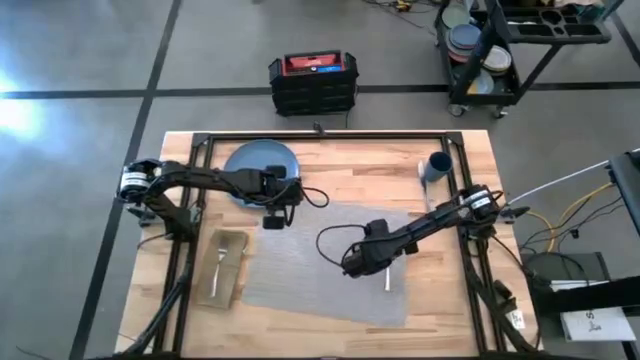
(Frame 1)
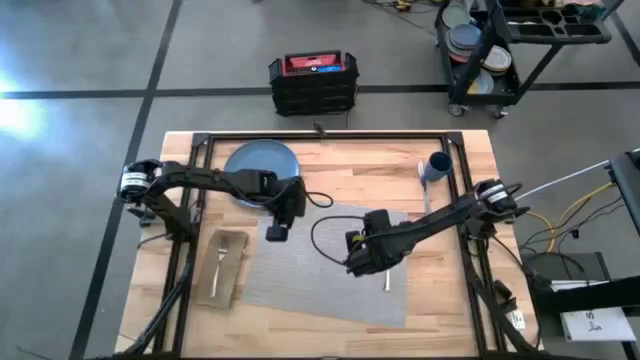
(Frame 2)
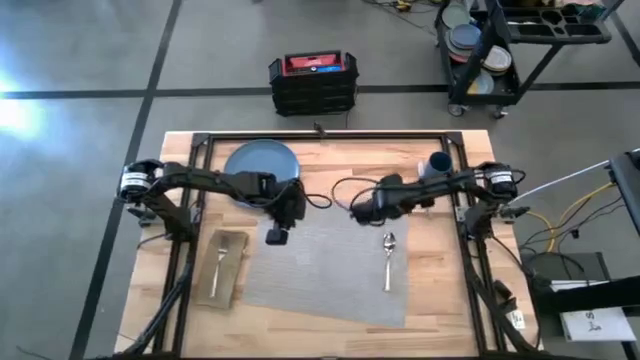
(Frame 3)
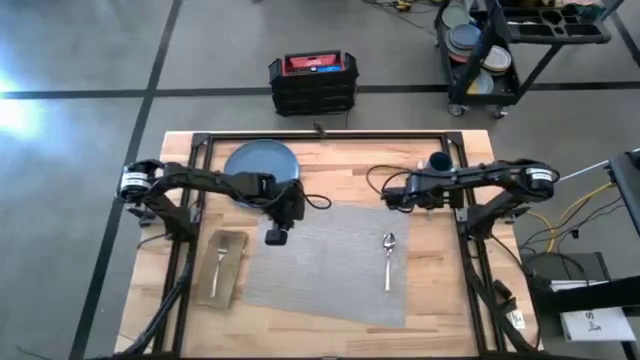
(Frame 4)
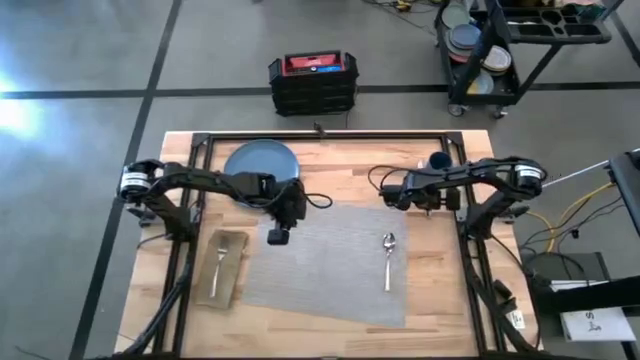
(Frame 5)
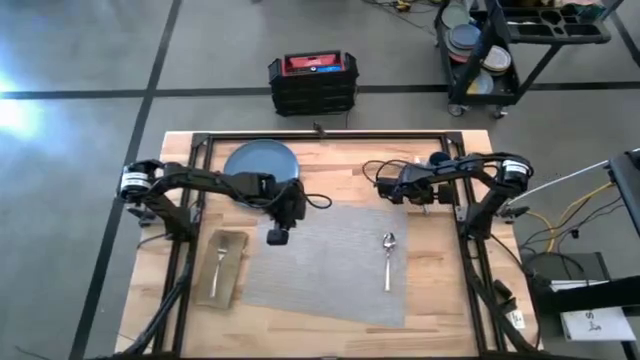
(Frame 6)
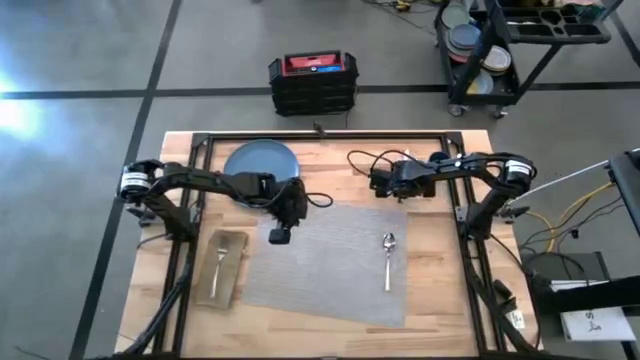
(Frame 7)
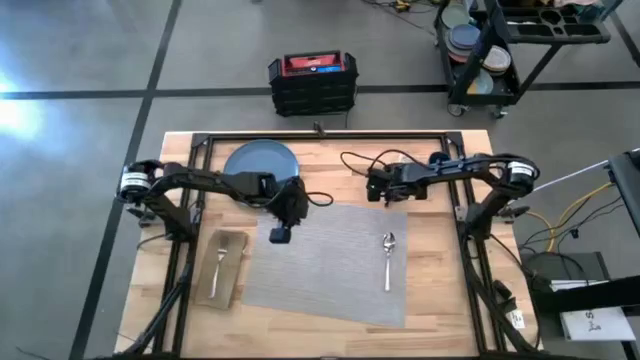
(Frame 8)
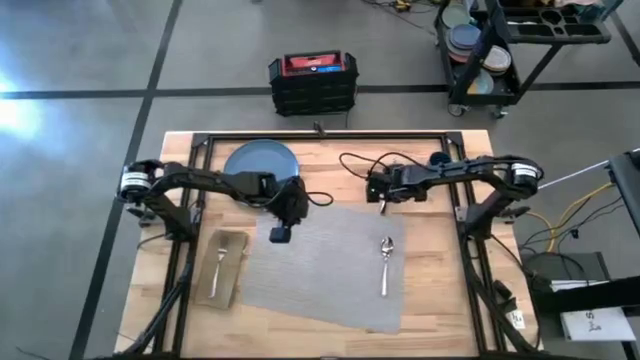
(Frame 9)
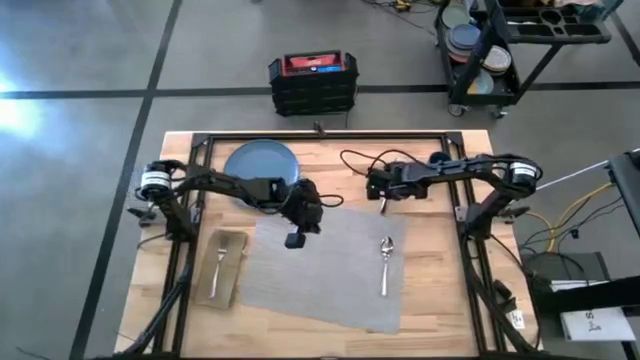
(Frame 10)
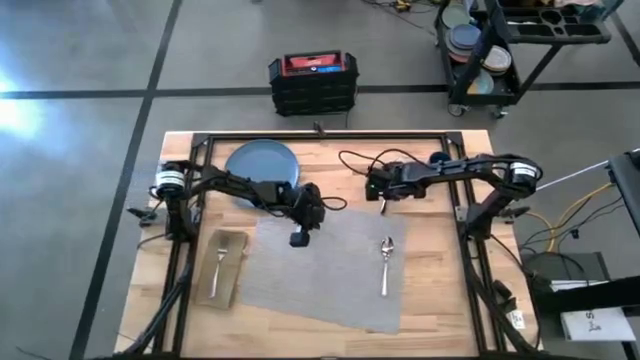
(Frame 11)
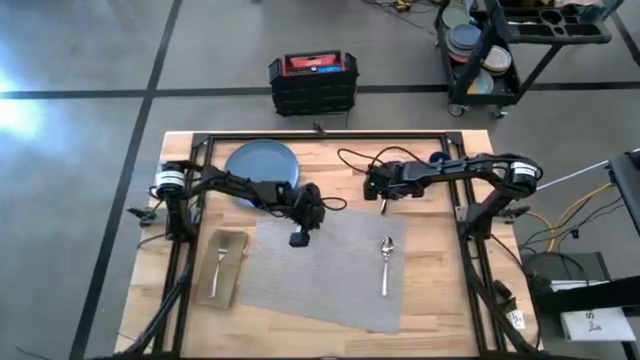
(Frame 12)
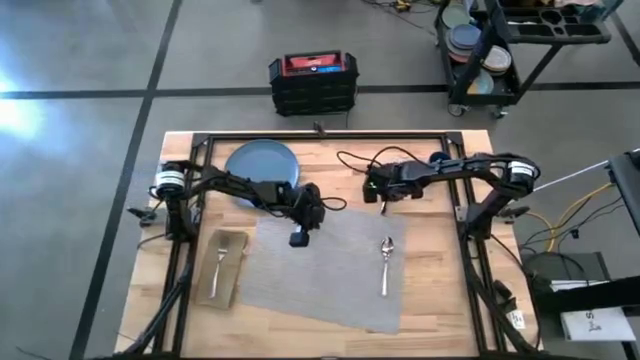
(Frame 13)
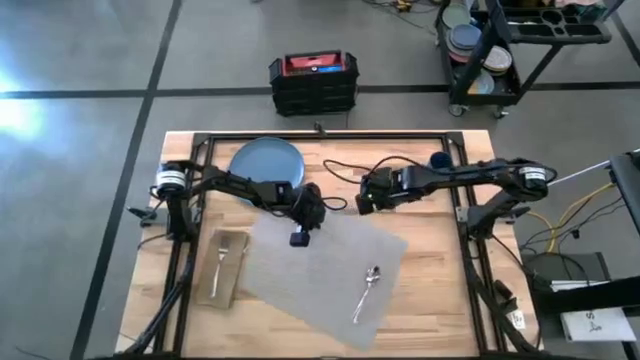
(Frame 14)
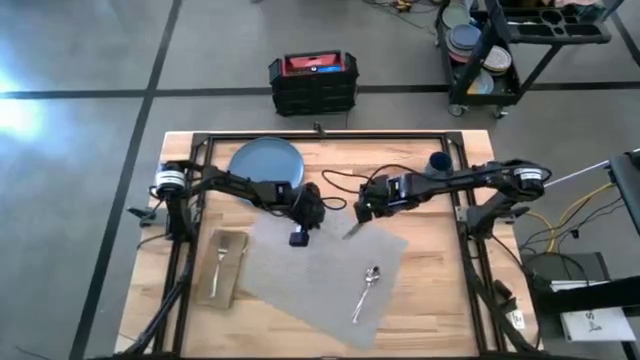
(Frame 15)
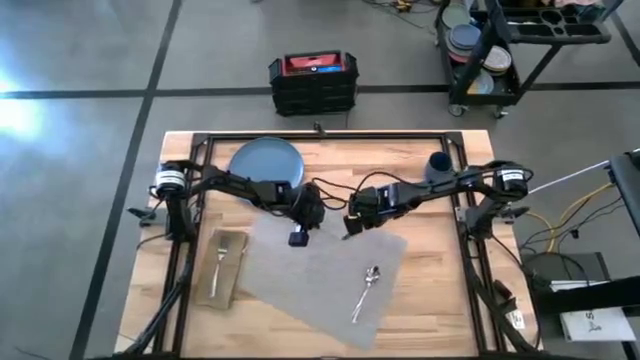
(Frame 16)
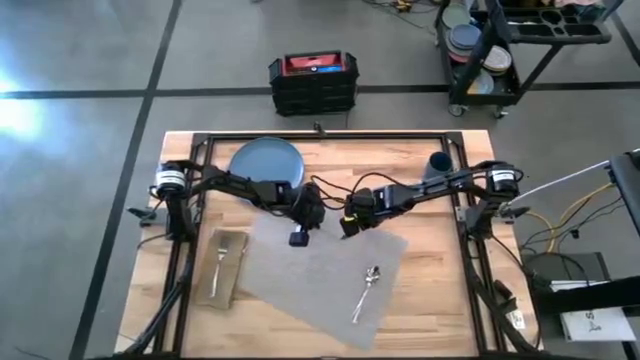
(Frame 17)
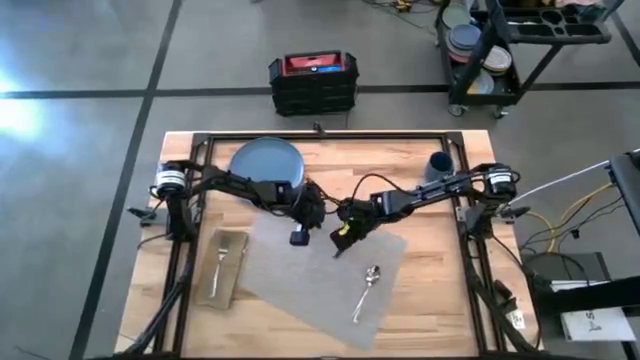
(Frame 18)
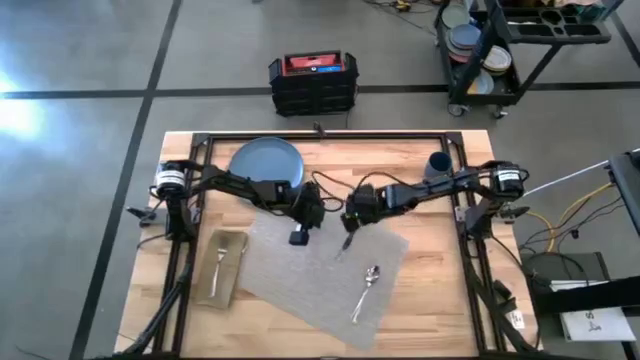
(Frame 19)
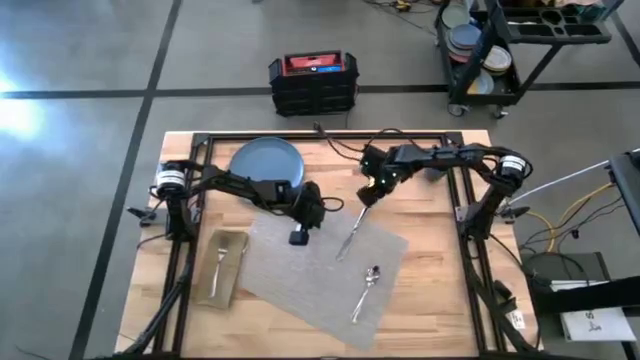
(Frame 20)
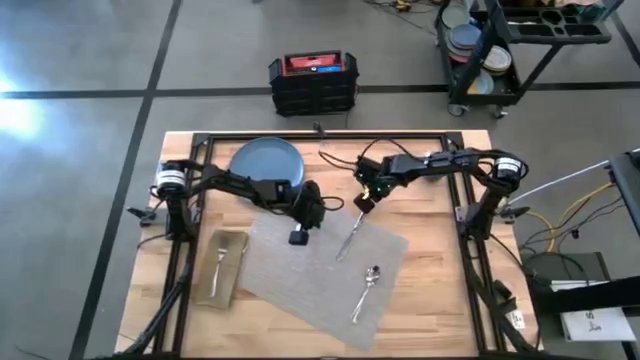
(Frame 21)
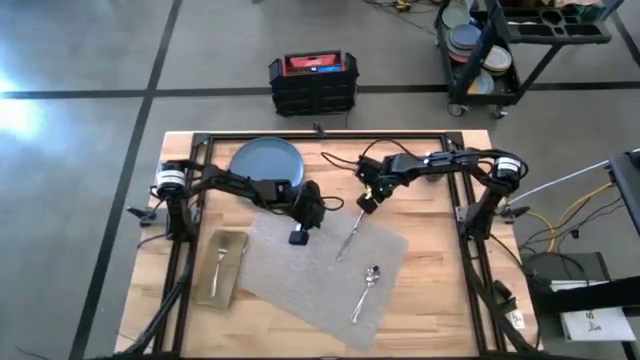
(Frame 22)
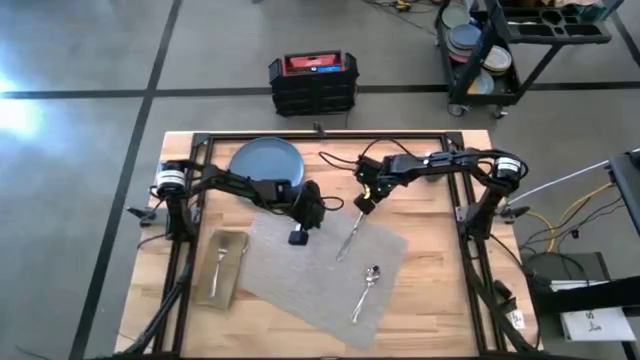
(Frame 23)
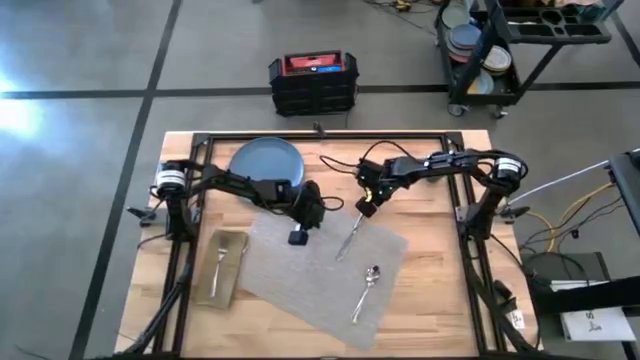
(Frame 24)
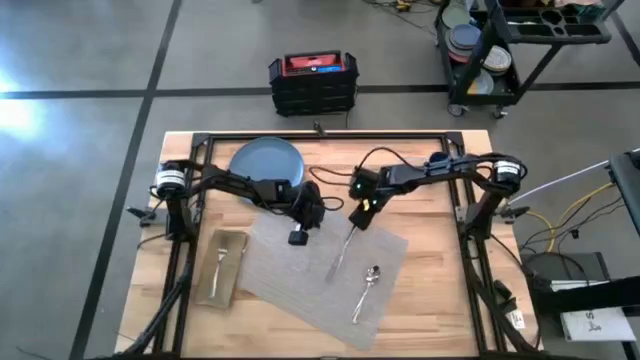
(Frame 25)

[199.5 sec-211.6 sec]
Task: Set table place
Put the silver table knife to the left of the silver spoon on the gray table mat

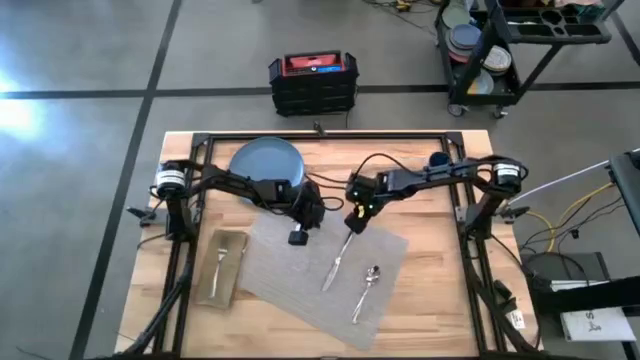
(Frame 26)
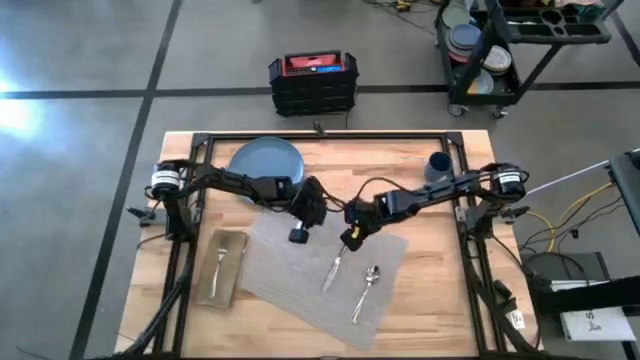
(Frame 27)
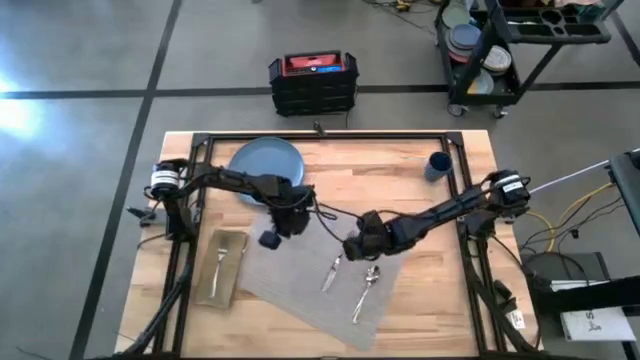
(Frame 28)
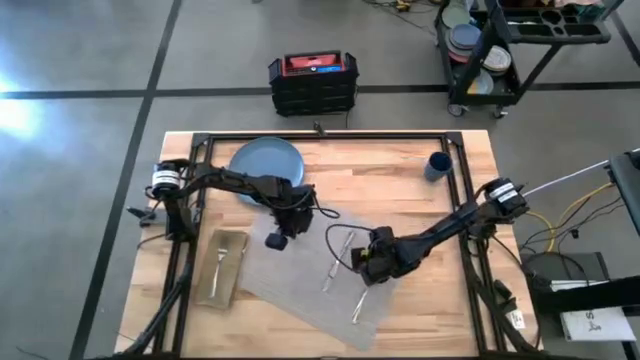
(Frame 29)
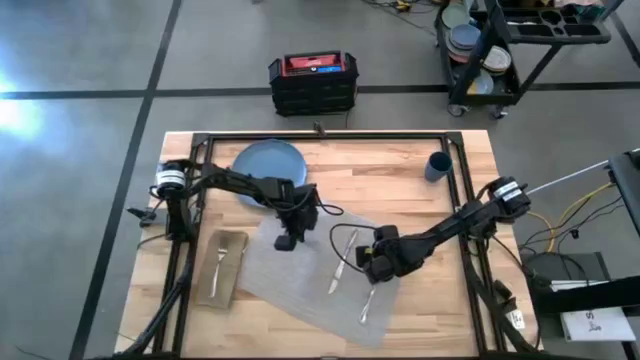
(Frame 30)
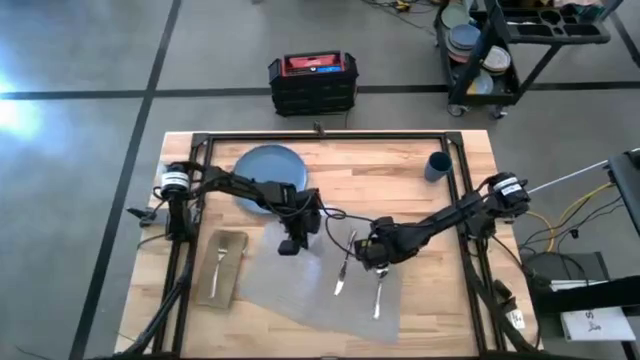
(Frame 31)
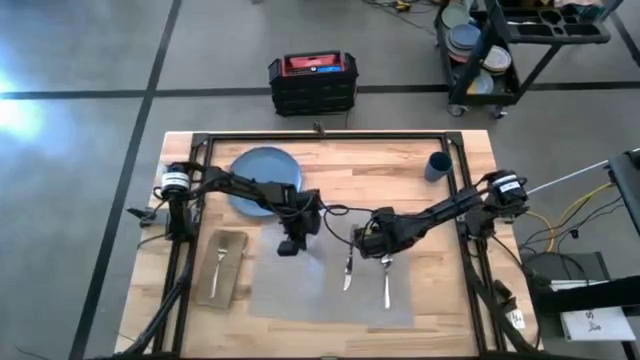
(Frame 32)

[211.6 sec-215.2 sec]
Adjust the gray table mat

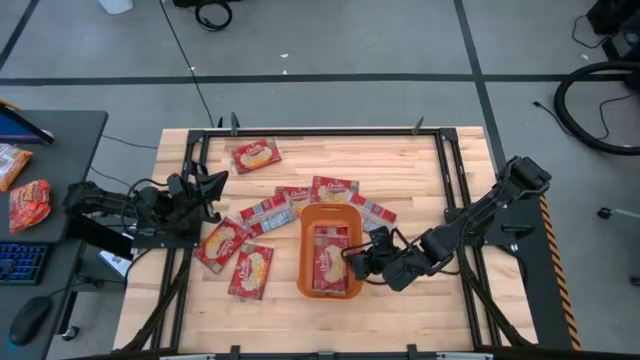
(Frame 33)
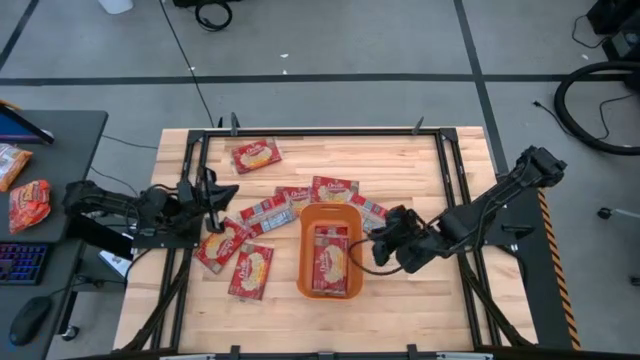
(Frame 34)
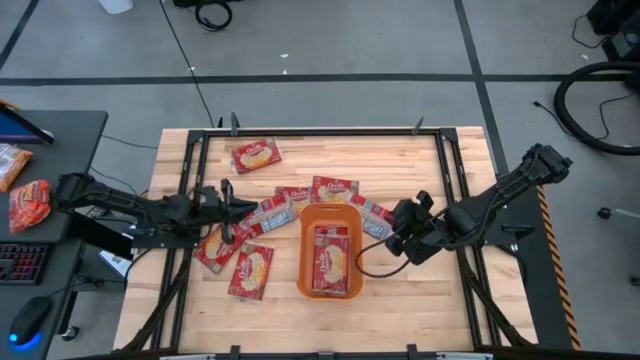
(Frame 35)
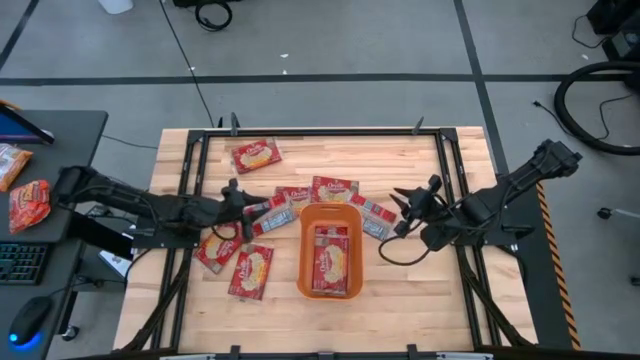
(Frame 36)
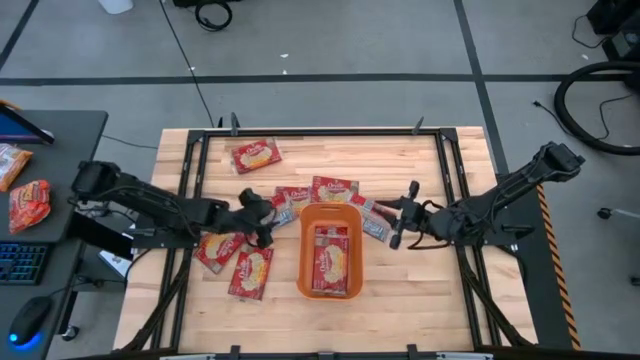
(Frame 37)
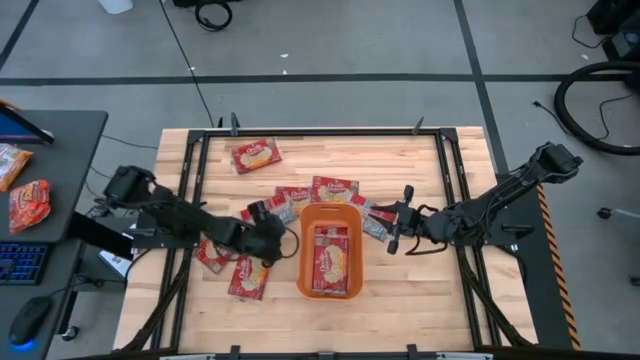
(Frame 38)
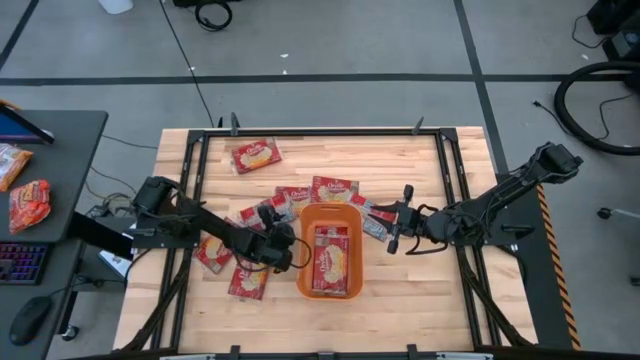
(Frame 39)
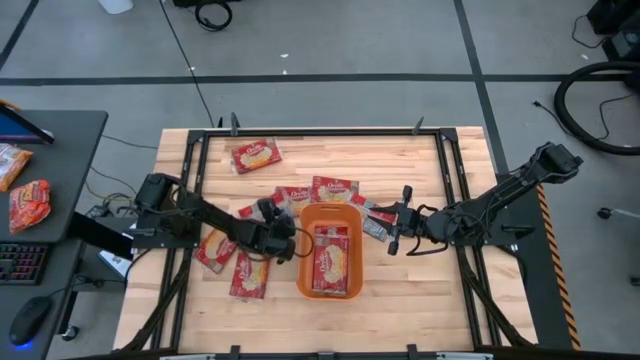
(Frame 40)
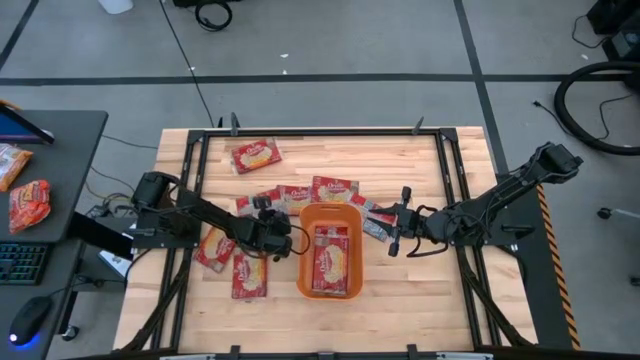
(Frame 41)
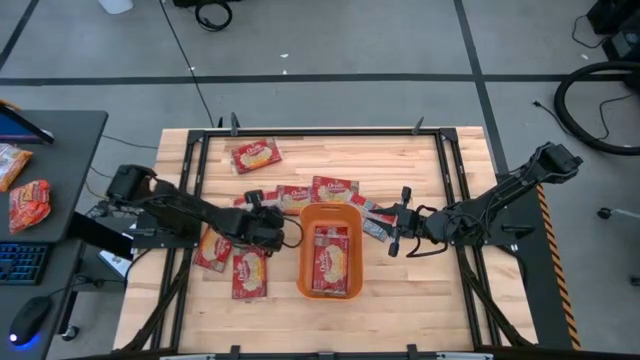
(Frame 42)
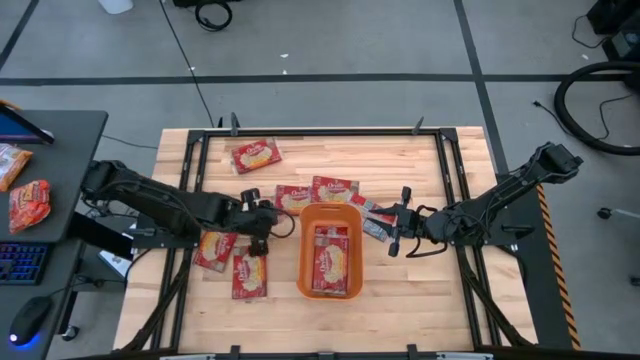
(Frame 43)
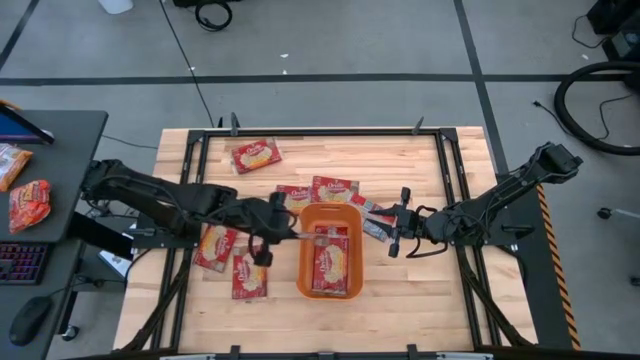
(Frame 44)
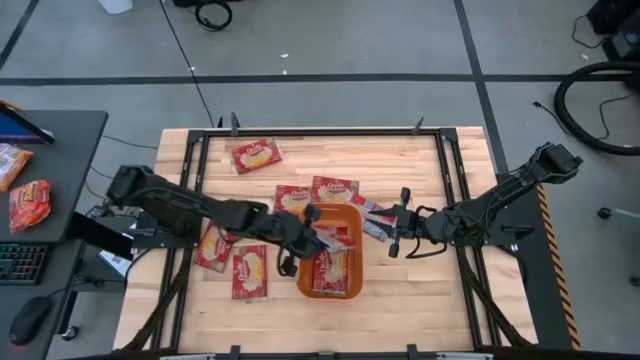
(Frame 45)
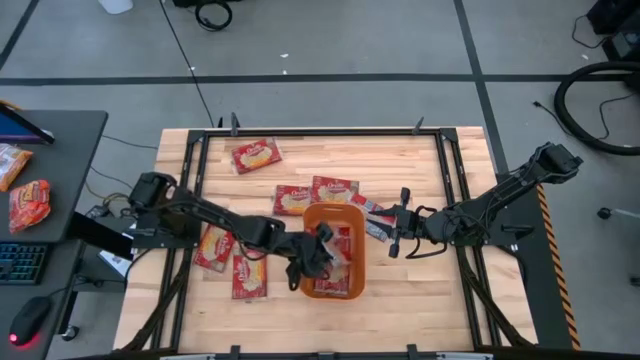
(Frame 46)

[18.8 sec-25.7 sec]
Task: Sort popcorn bags into baskets
Put the red popcorn bag into the orange bin
